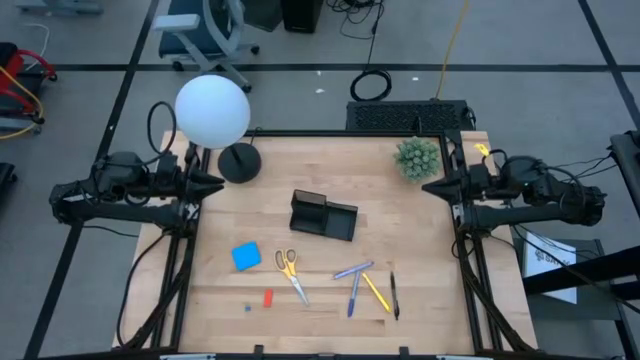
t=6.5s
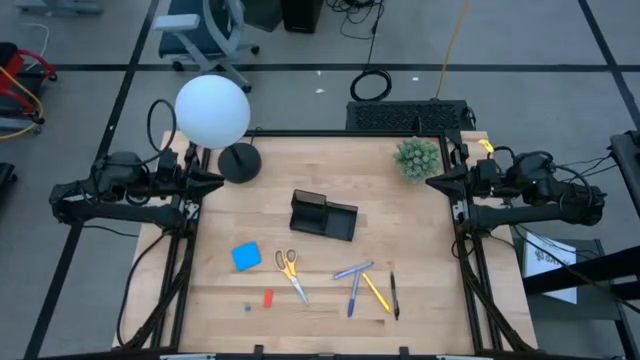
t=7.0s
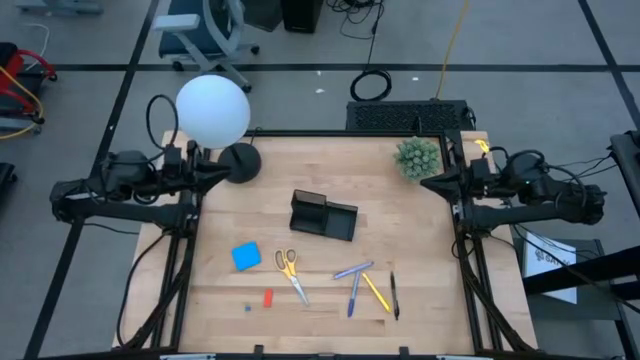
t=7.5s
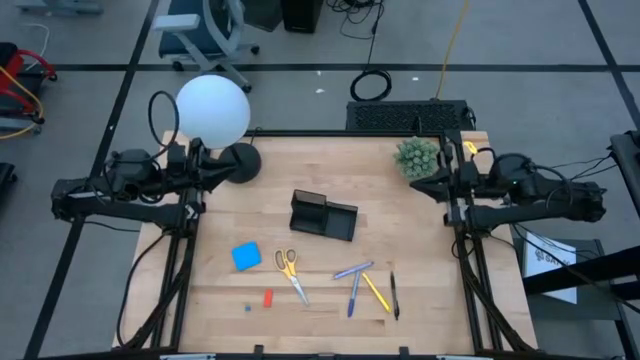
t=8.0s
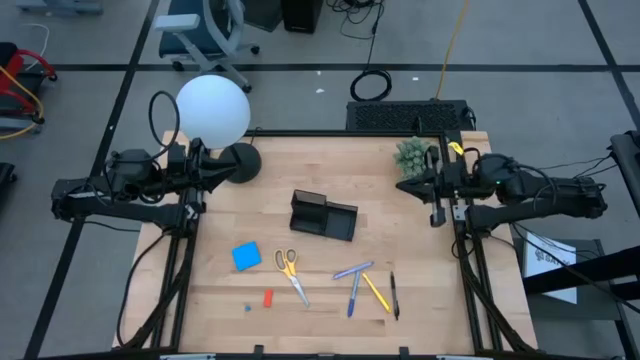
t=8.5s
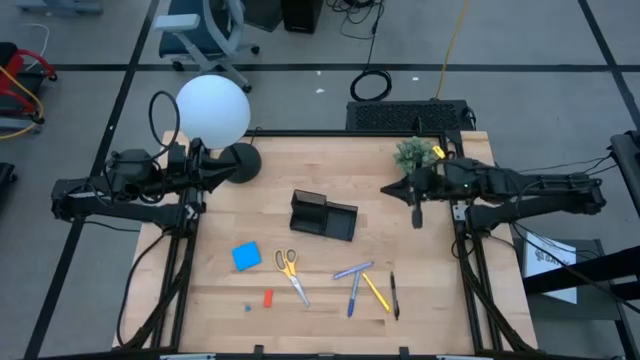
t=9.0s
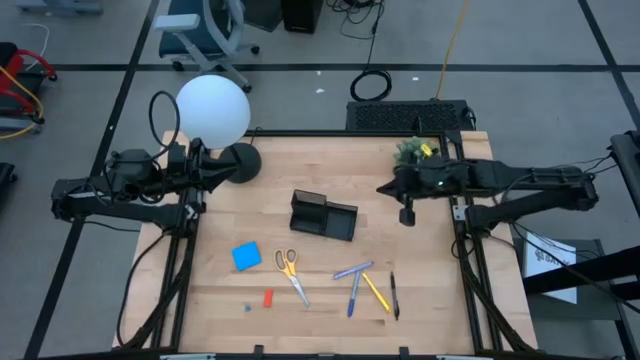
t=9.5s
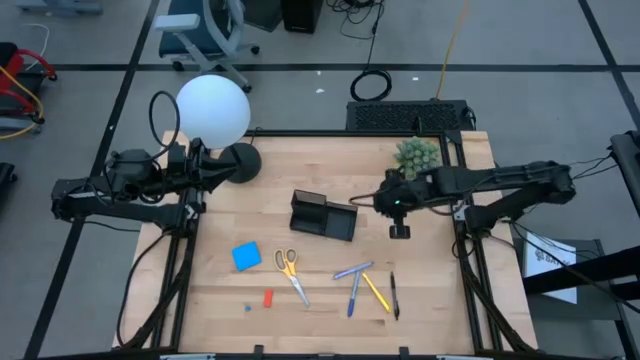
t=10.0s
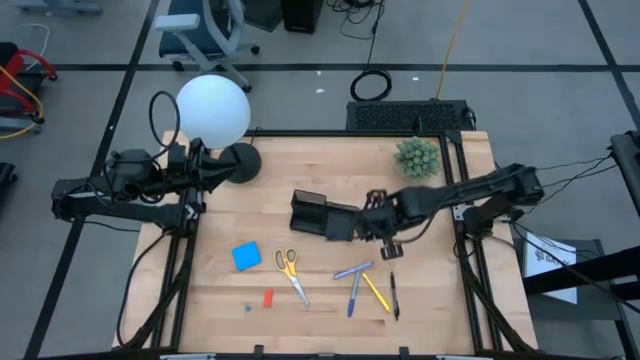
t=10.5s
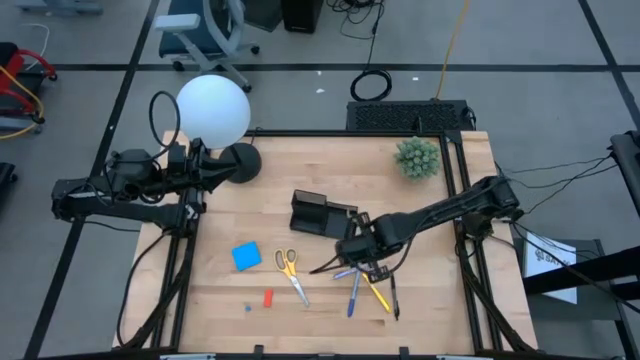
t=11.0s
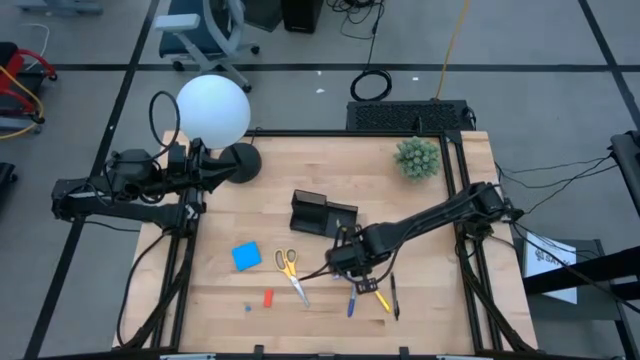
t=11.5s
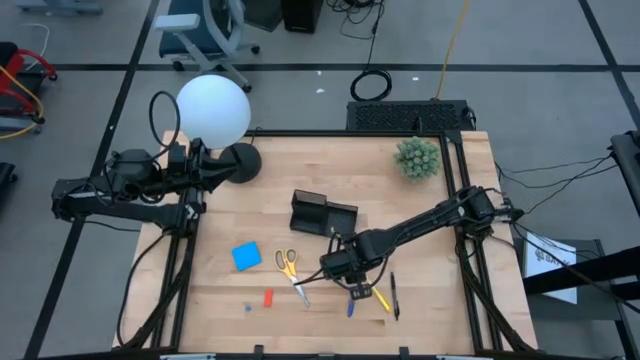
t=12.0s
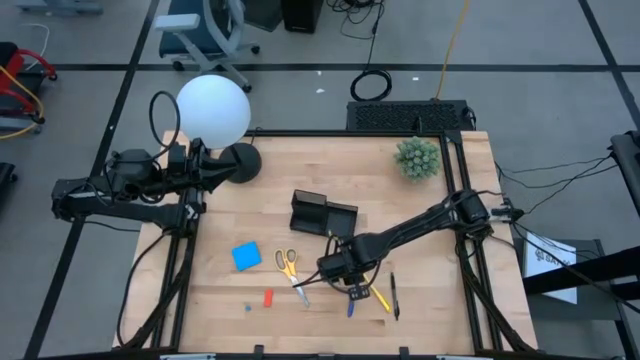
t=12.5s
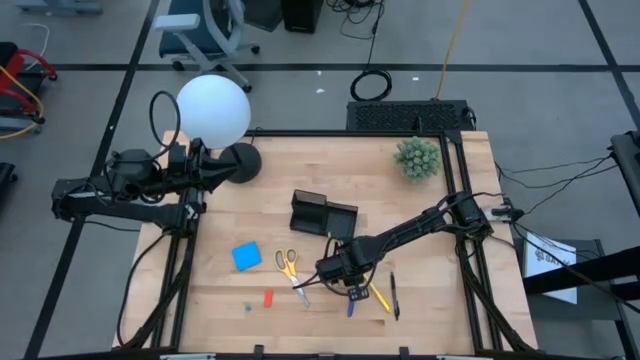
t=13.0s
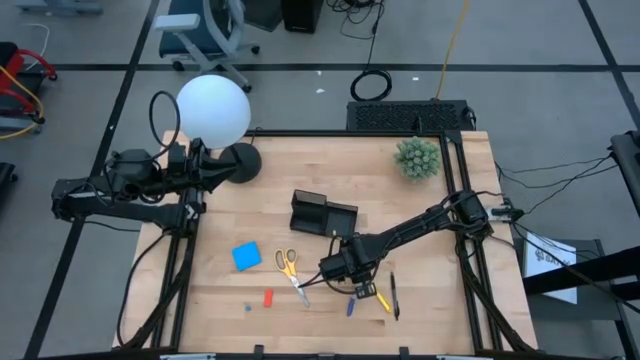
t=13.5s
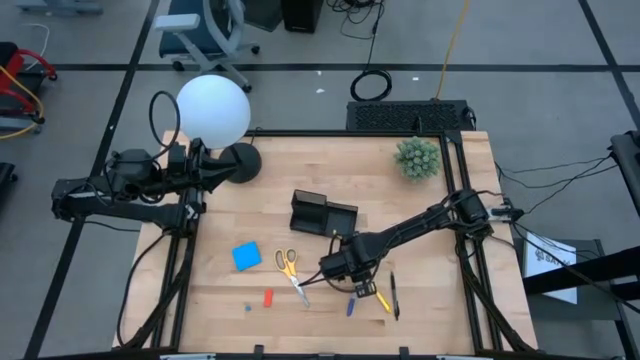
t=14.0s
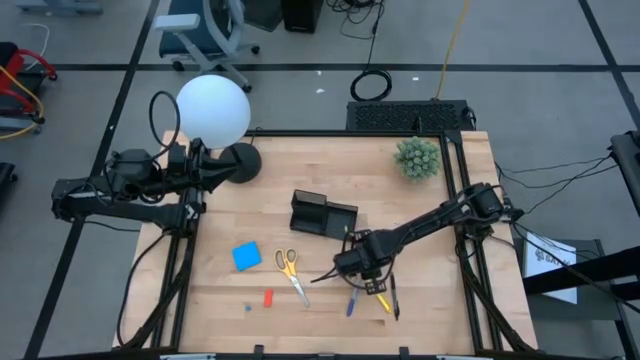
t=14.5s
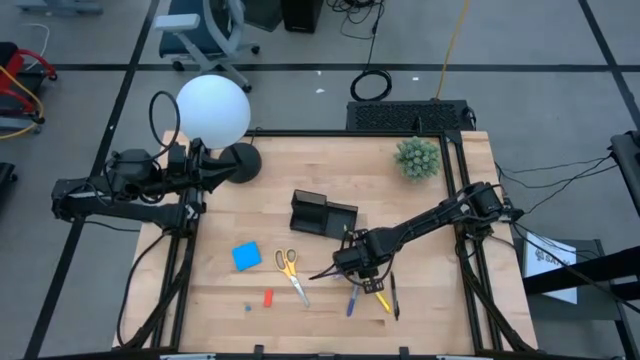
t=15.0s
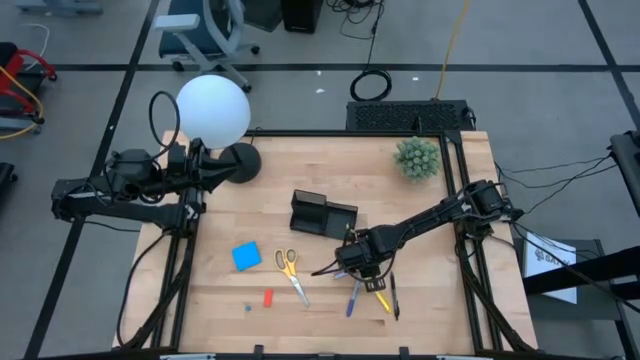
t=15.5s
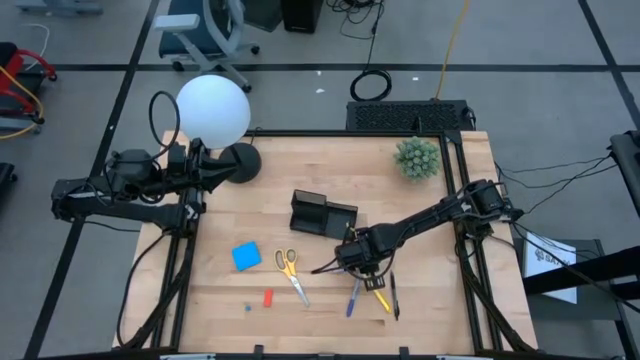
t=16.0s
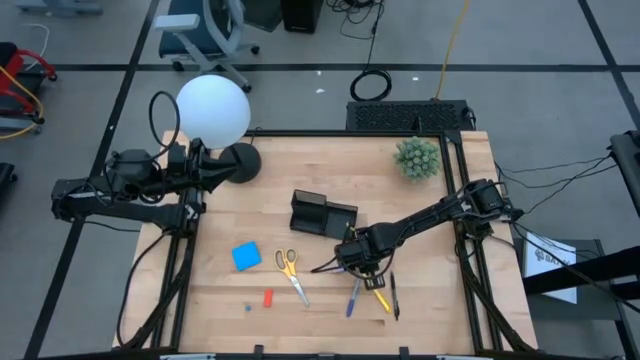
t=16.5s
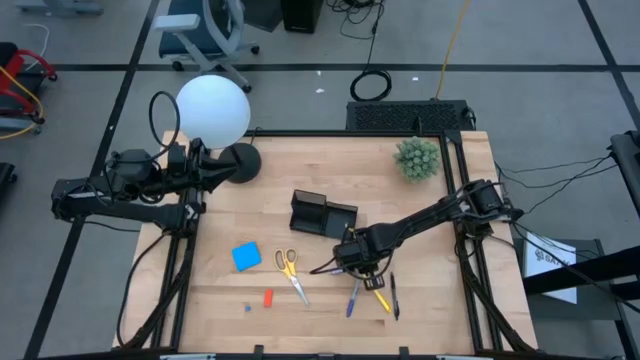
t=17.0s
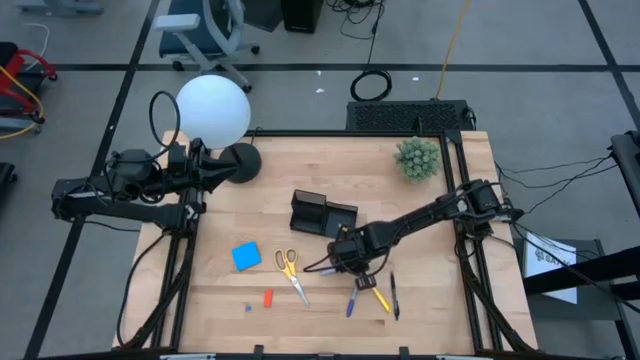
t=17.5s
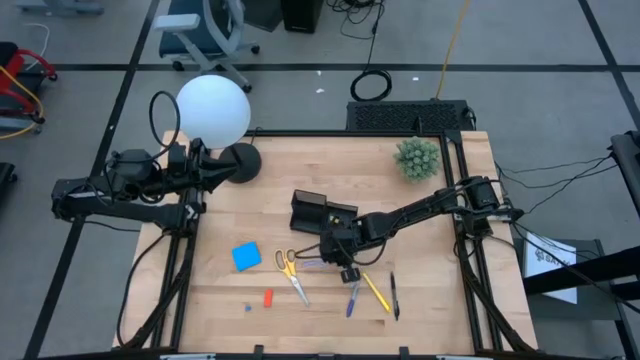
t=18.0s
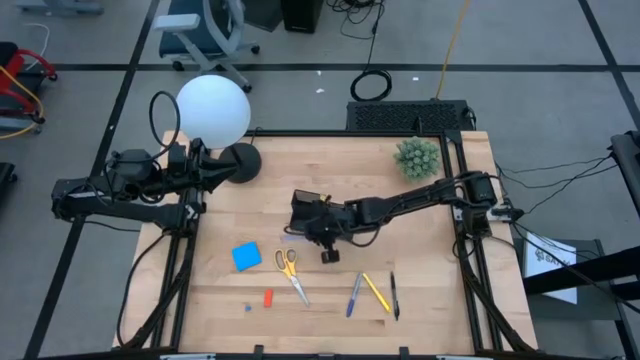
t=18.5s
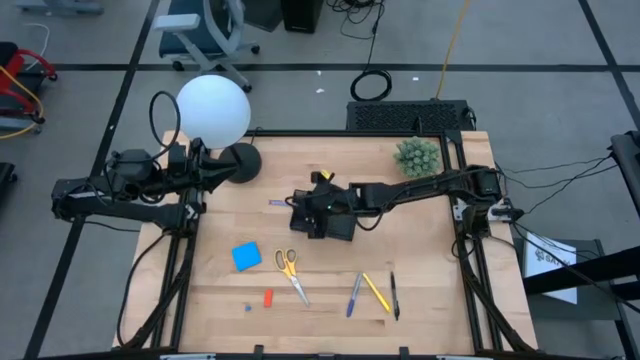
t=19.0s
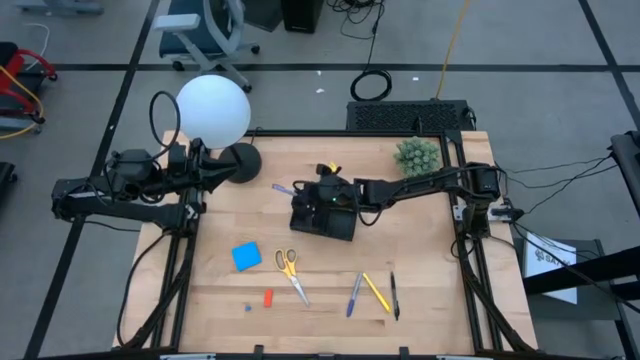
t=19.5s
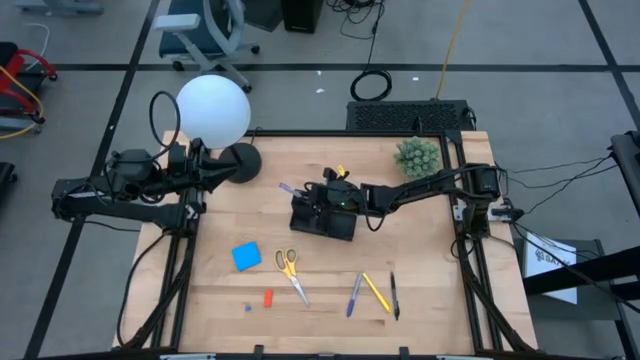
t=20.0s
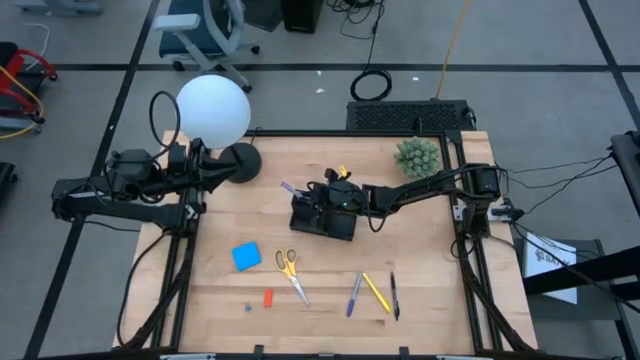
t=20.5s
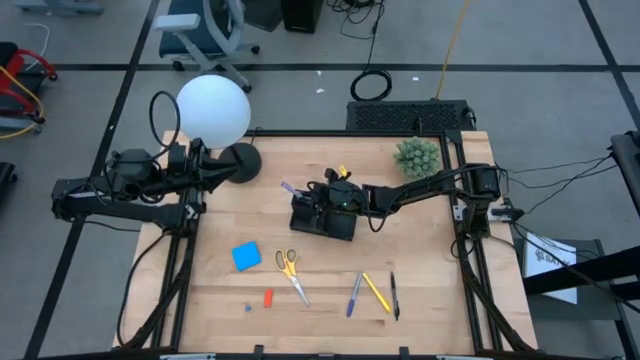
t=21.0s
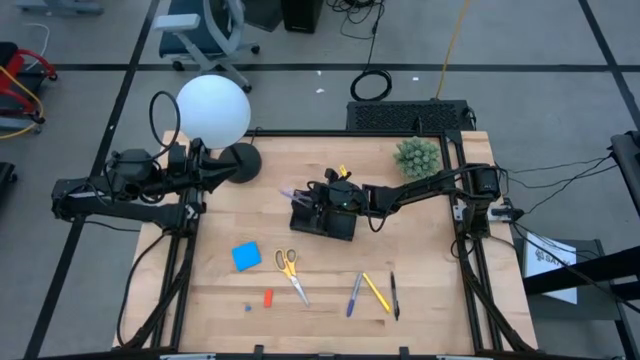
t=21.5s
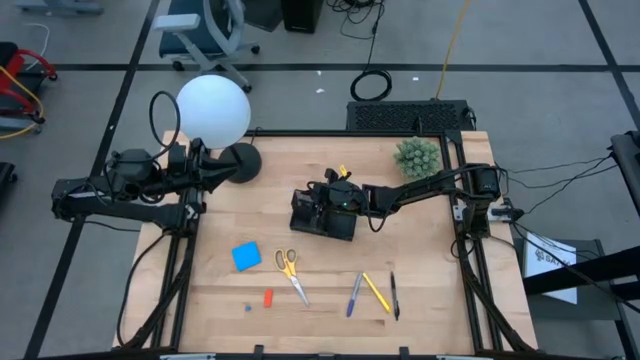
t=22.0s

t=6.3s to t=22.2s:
Task: Pick and place office supplies into organizer
Put the purple pen into the top left compartment of the black desk organizer

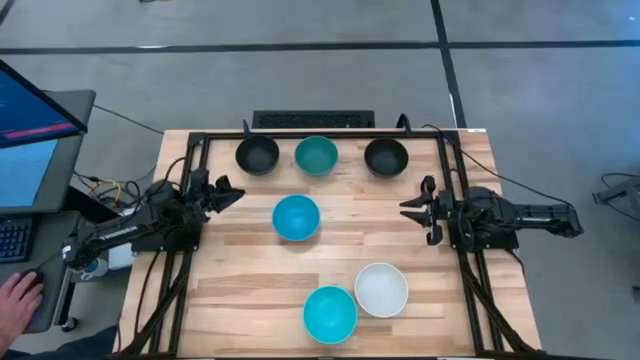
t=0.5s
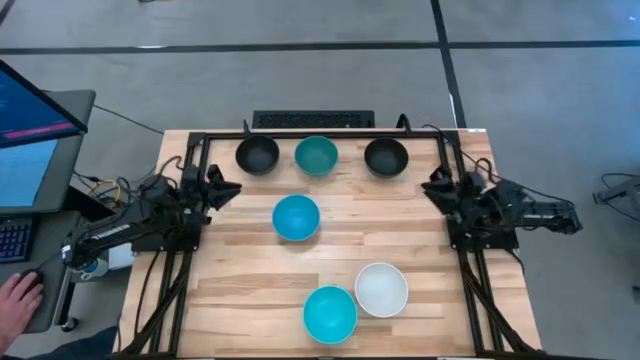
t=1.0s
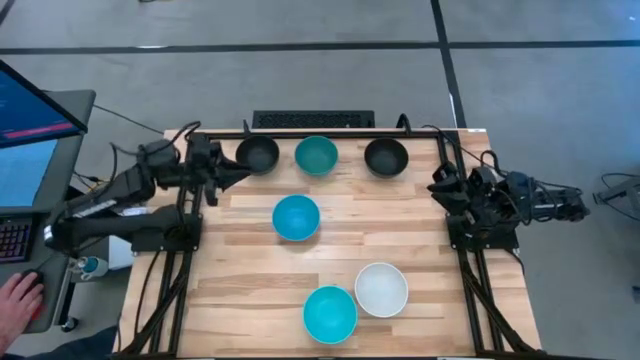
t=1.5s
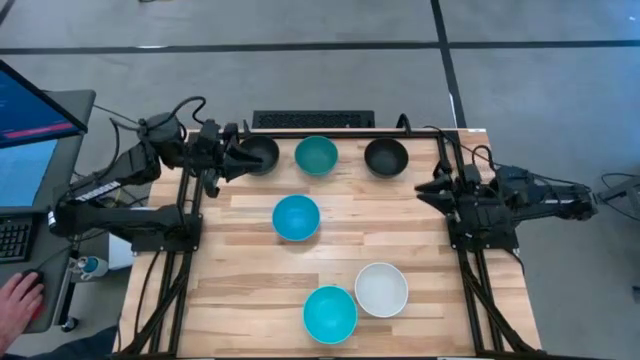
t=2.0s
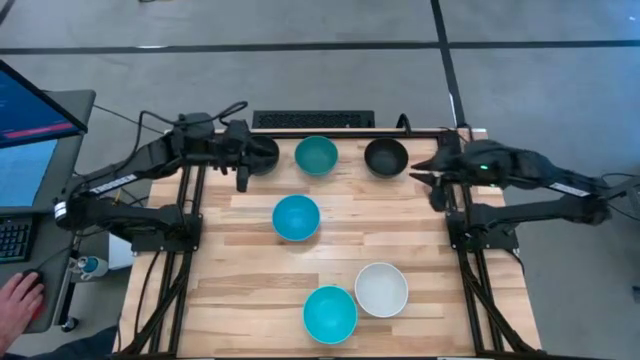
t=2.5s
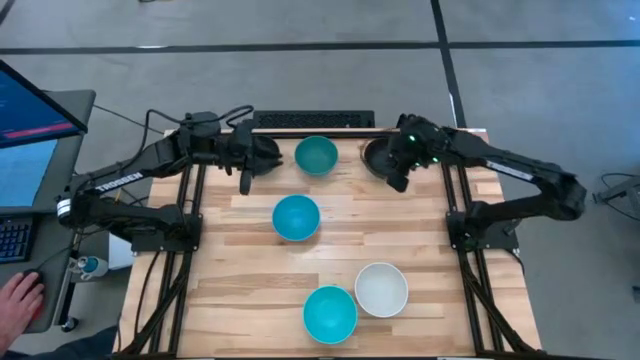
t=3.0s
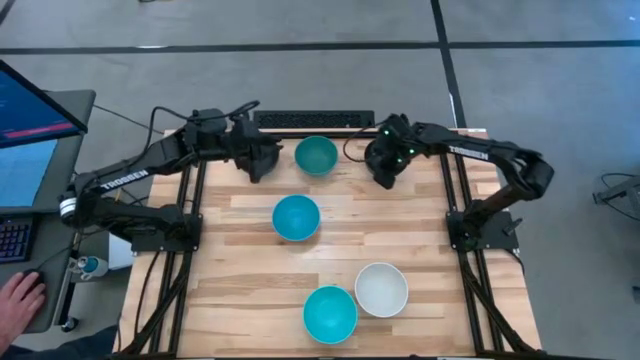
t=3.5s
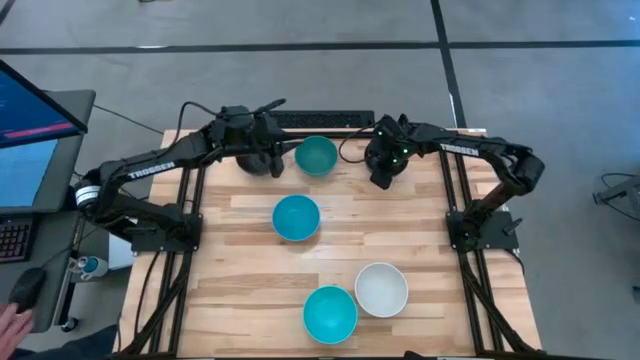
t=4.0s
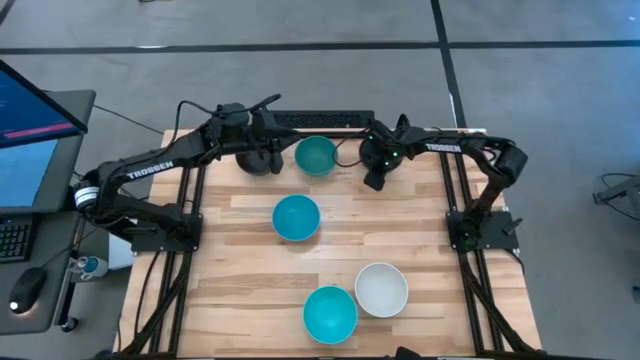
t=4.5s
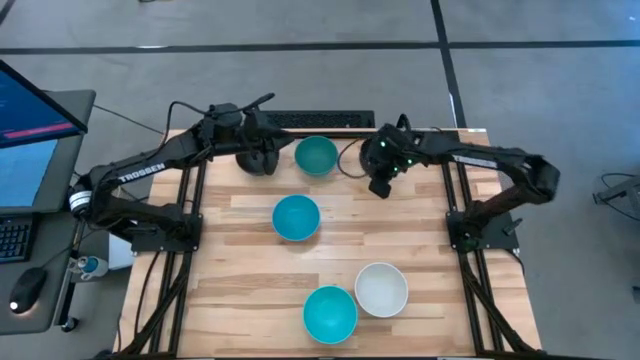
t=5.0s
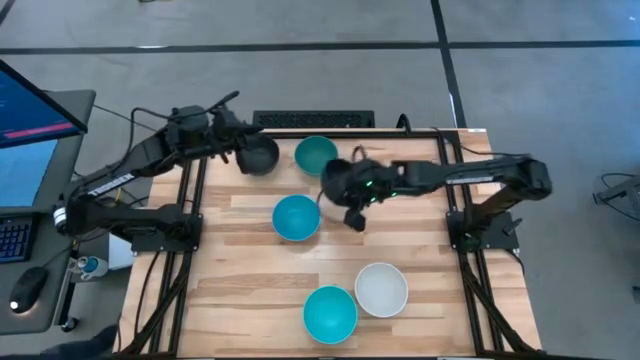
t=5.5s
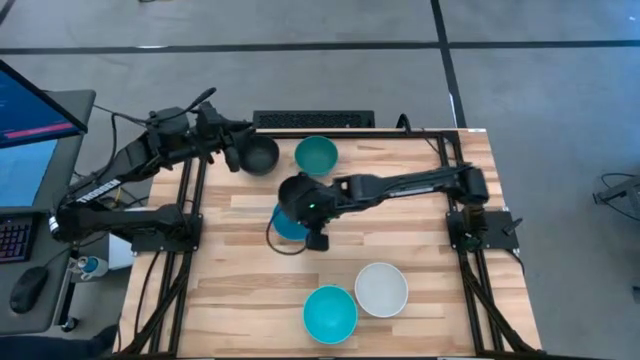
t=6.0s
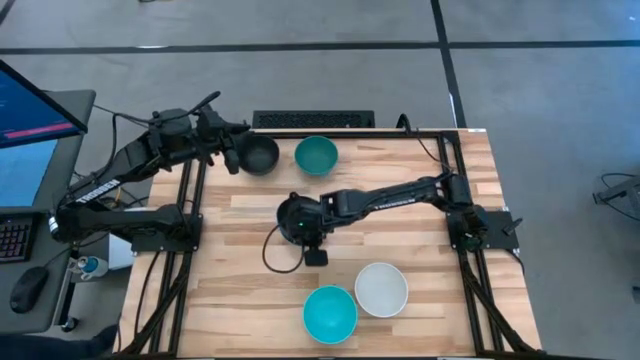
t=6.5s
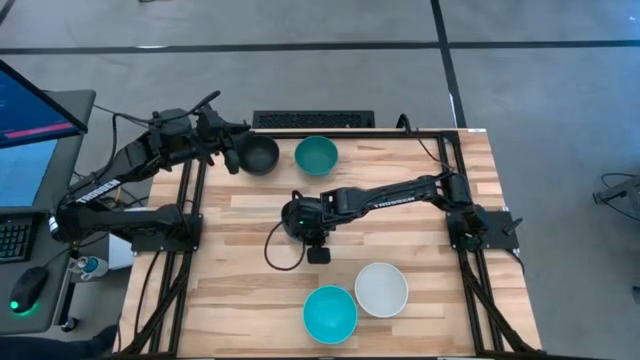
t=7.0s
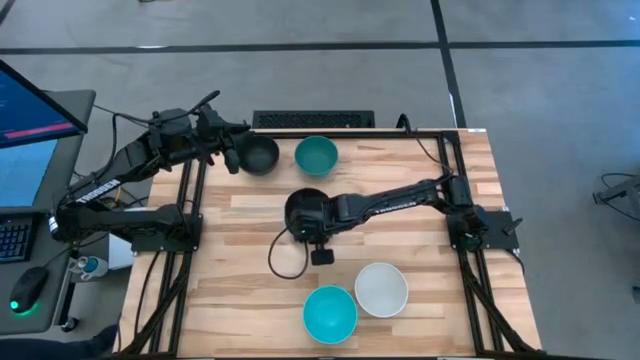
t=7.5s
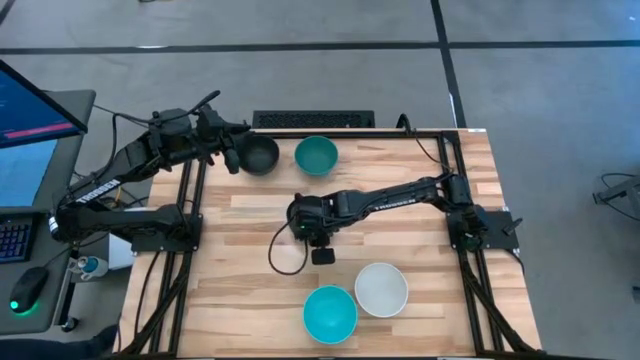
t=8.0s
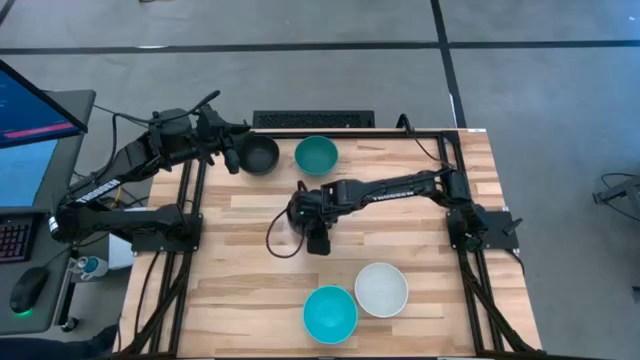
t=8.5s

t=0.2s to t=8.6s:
Task: Nest bowls inside each other
Stack the right black bowl on the top blue bowl
